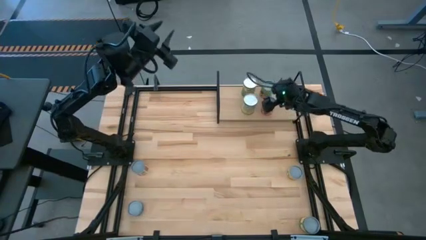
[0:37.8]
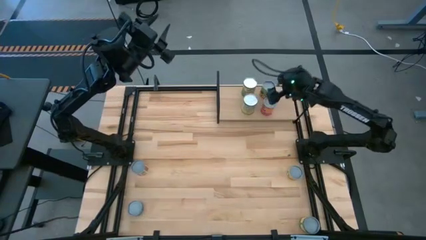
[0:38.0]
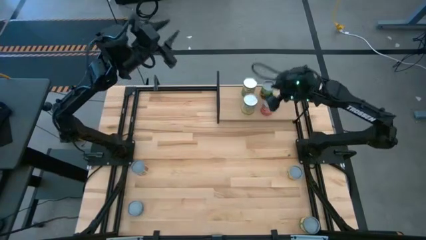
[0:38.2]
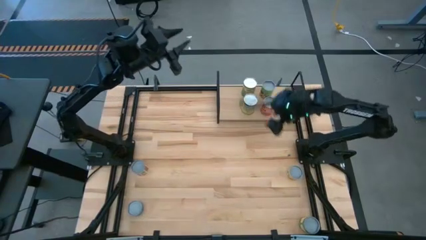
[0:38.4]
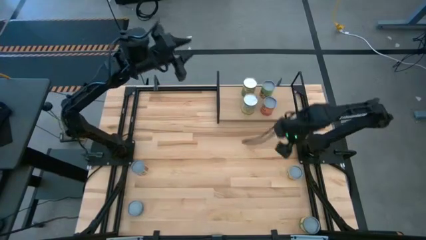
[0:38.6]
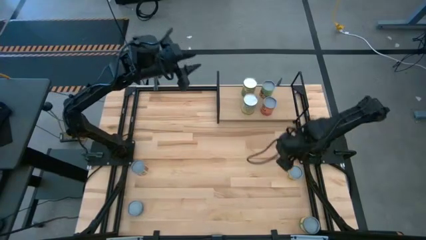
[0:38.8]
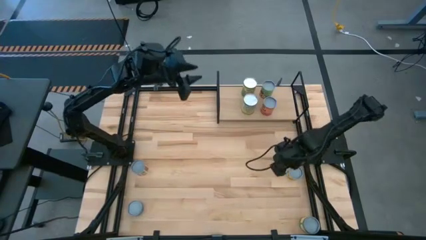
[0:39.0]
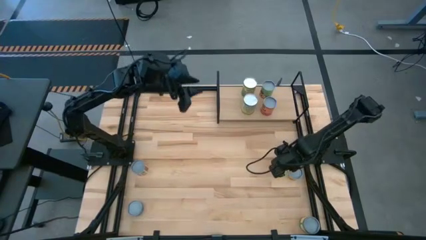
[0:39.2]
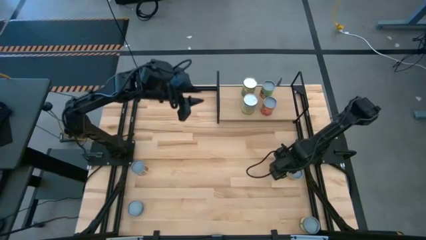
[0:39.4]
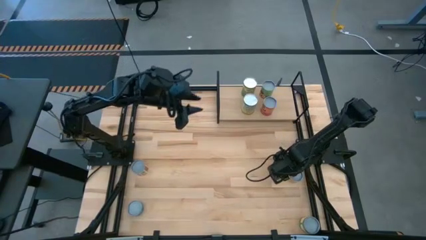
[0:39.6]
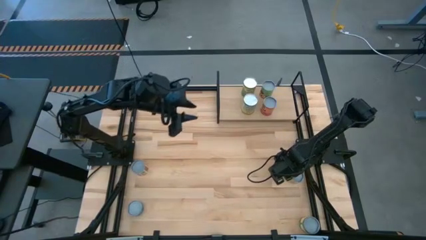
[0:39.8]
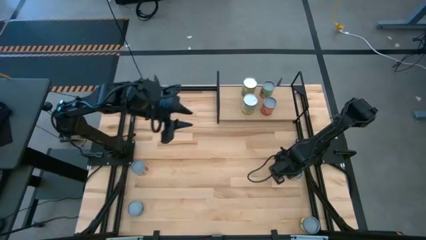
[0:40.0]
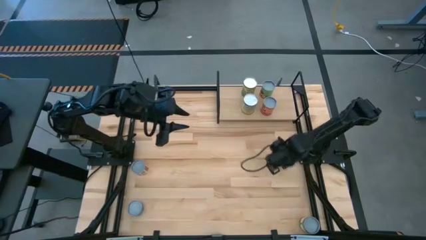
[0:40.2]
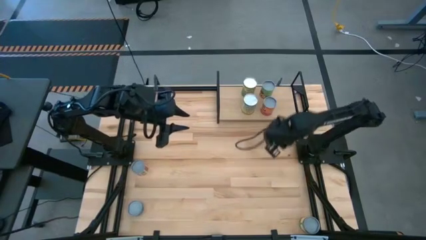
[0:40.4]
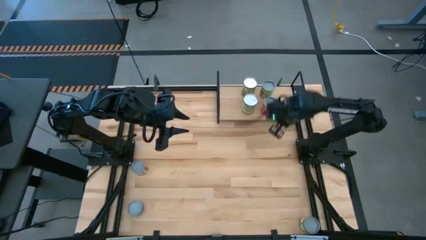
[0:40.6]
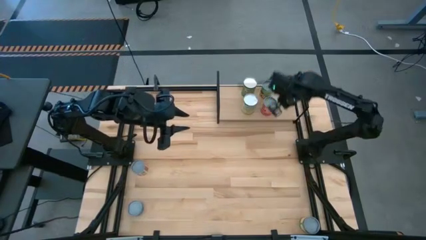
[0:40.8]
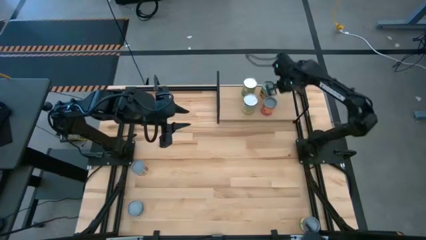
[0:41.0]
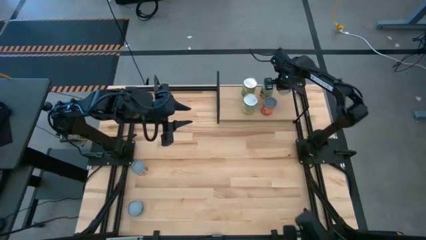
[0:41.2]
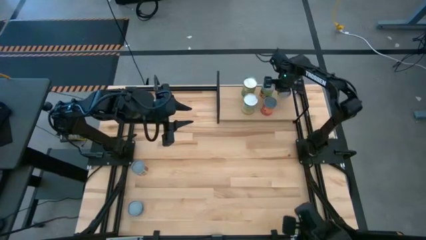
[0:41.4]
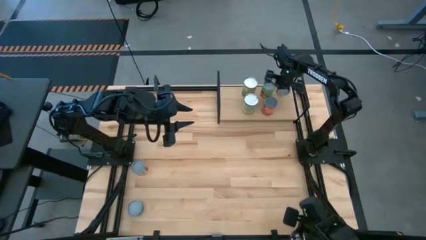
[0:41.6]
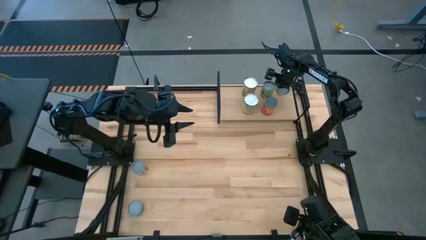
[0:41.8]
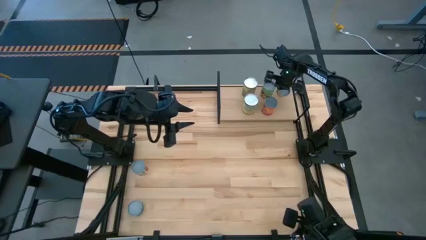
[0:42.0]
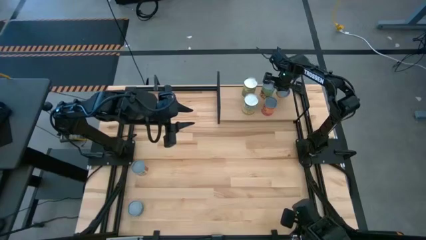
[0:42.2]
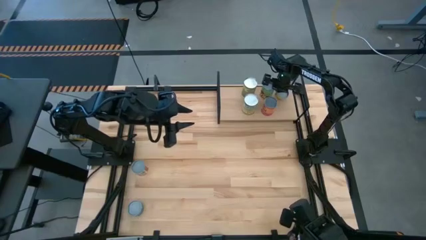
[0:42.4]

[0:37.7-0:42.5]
Task: Pick and place cans onto a shelf
Put the small yellow/green can on the shelf

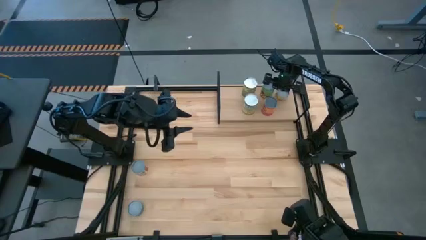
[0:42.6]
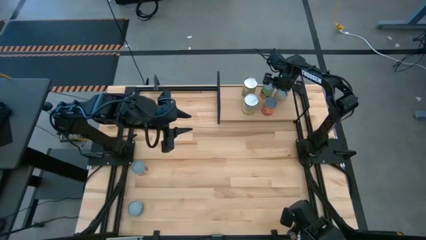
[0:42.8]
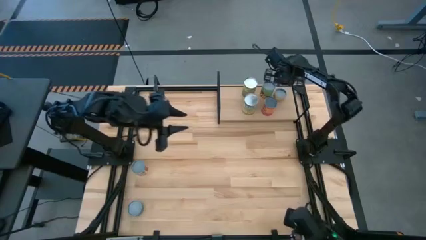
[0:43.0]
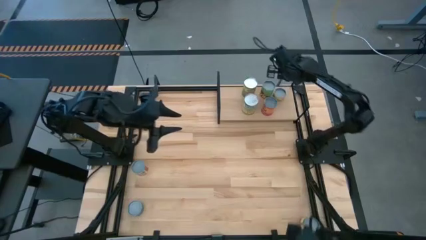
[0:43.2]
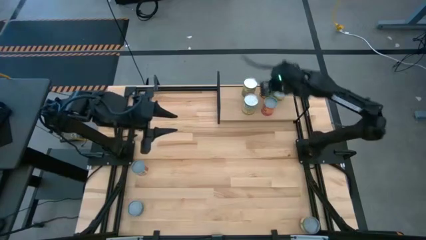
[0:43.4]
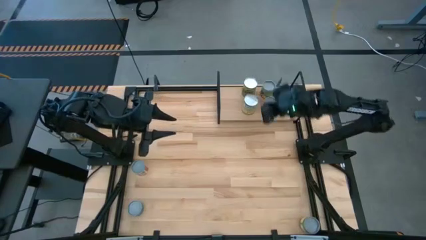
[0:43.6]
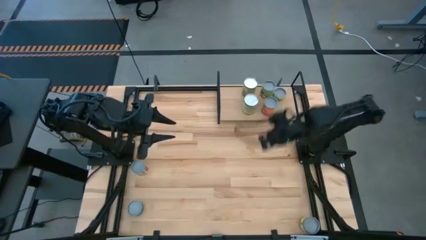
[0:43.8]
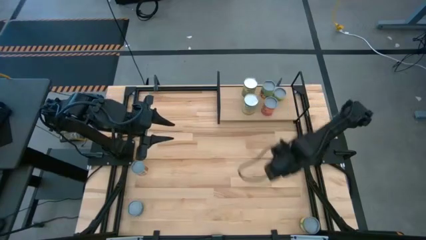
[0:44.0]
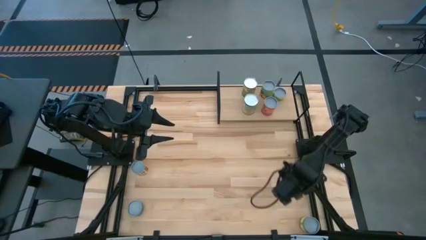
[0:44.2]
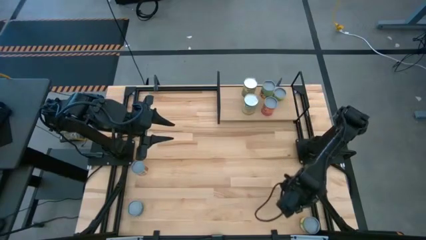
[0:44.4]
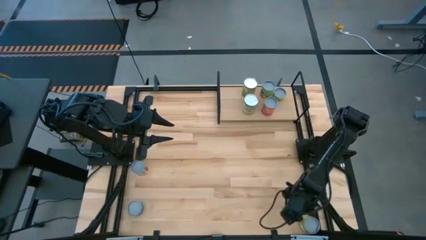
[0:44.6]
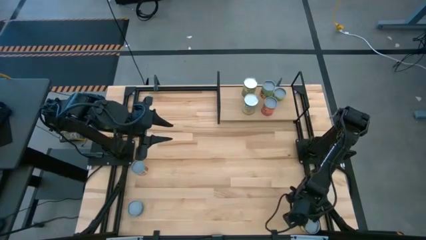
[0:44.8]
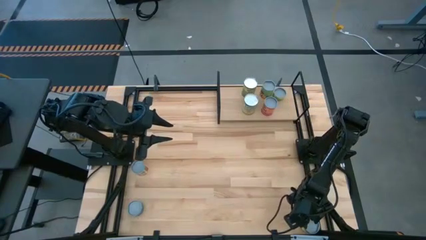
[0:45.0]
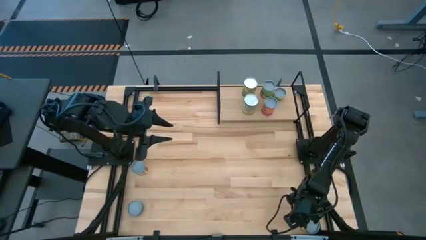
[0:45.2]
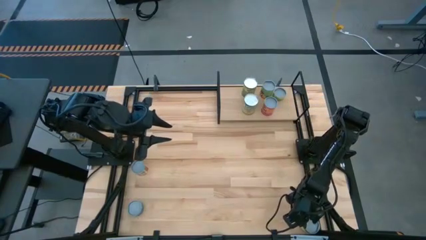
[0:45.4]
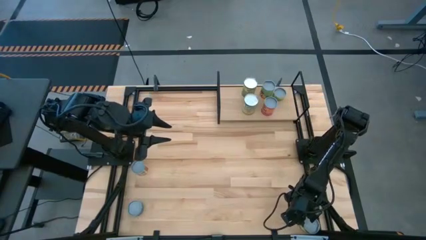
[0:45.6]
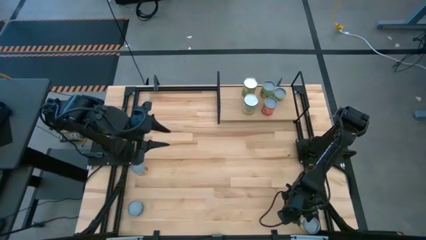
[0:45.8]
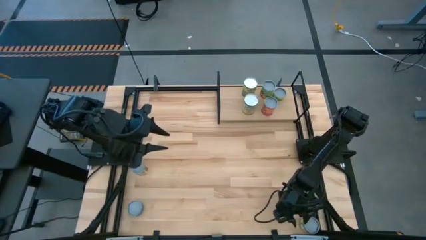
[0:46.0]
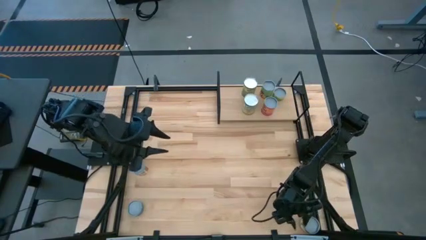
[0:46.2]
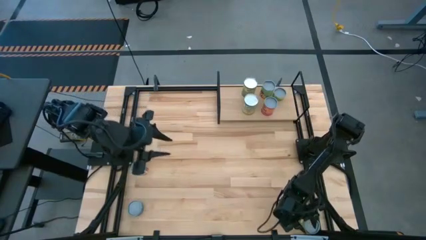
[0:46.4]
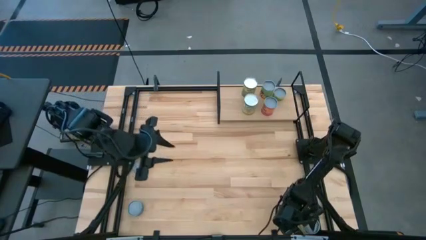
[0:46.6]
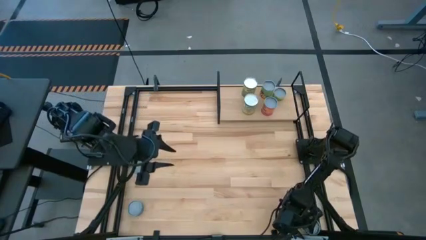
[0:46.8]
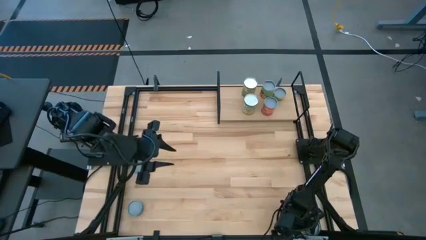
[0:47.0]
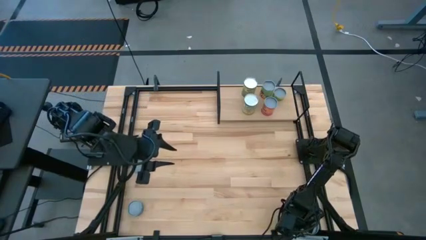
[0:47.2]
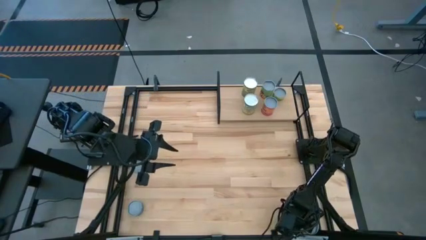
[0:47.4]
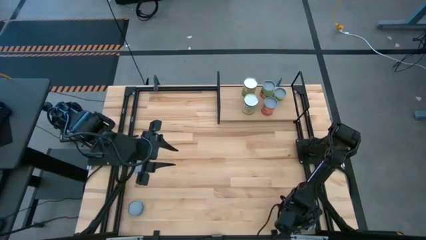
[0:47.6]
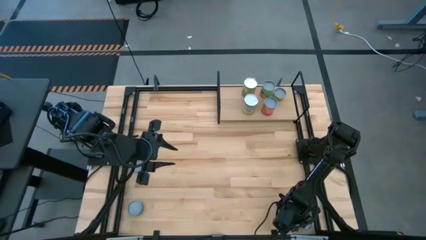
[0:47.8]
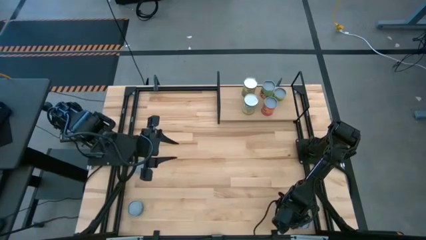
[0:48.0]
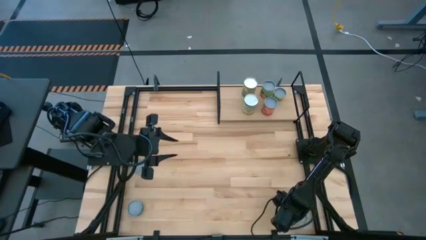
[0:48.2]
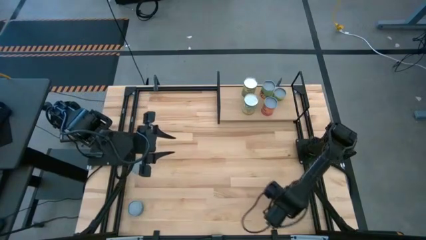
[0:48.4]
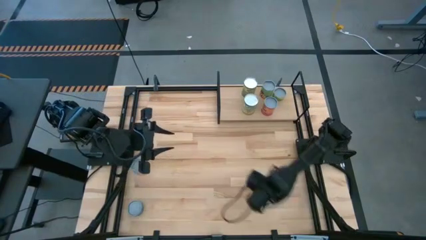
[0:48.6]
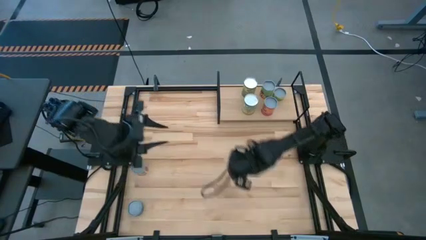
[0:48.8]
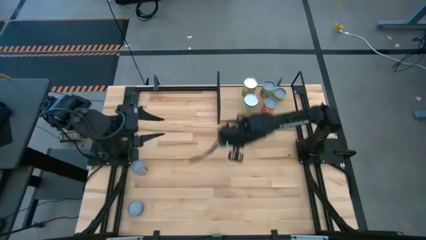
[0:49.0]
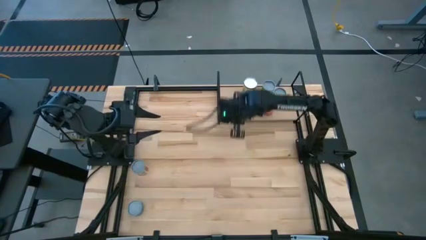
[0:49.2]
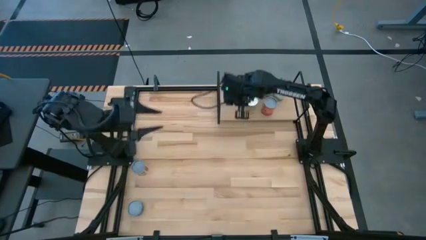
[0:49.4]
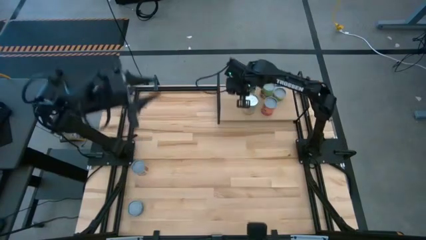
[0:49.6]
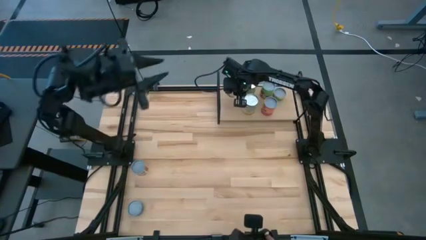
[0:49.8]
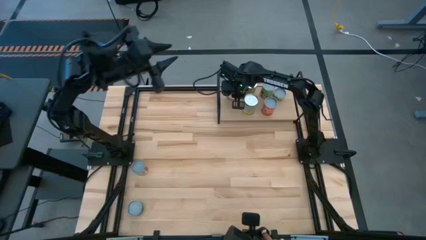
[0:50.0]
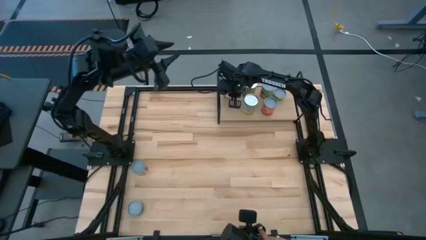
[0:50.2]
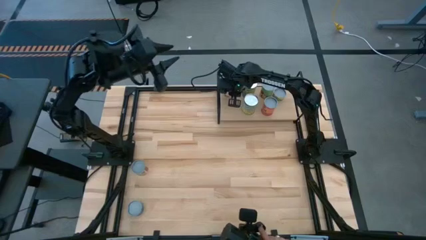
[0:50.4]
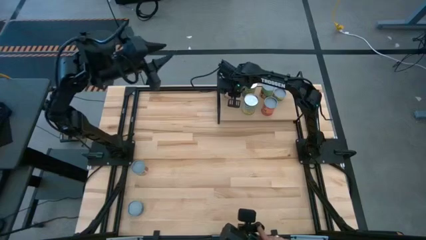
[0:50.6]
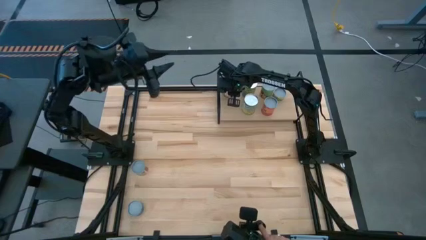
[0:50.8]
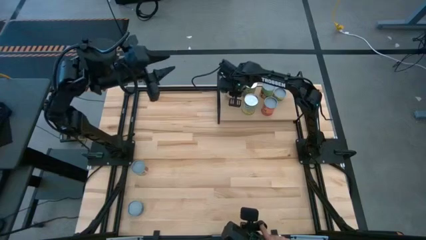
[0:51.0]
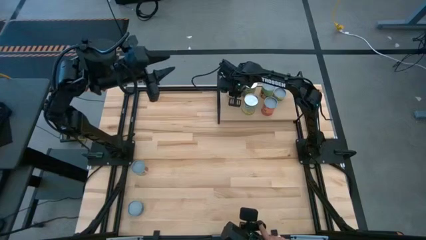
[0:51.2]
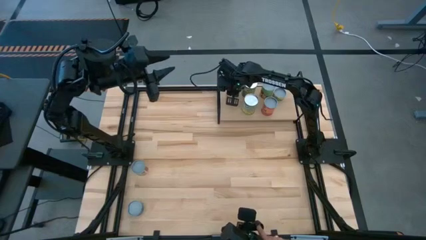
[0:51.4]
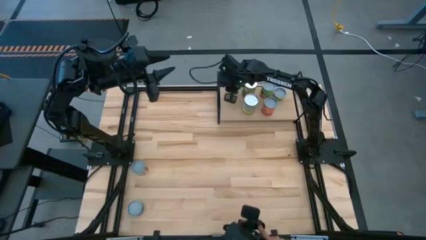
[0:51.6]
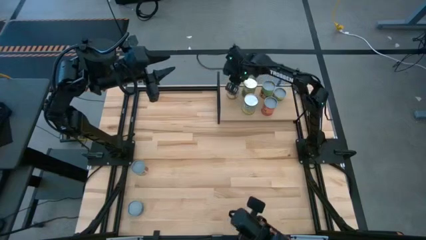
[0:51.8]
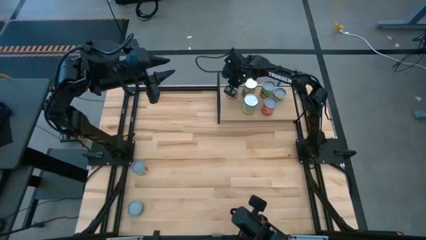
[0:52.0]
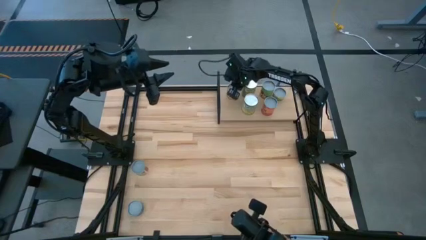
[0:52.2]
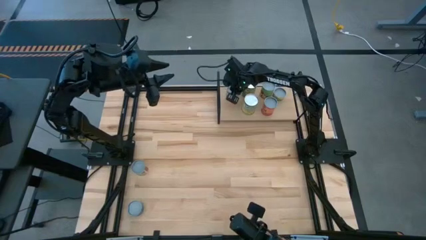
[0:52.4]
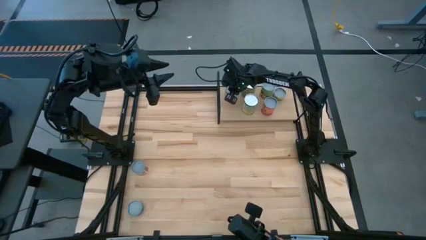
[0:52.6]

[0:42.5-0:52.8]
Put the green/orange can on the shelf

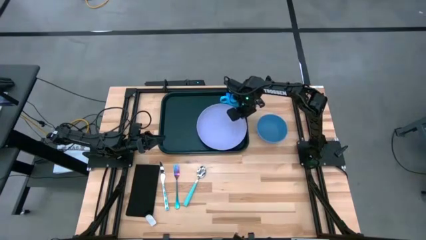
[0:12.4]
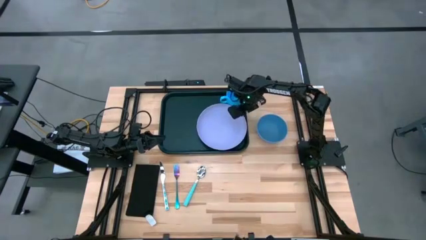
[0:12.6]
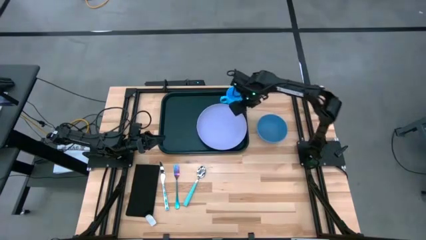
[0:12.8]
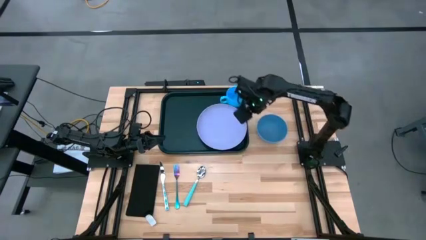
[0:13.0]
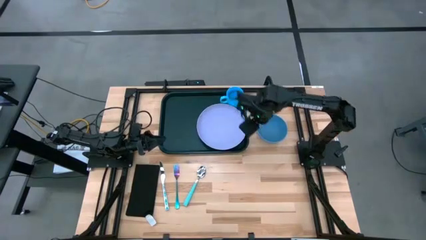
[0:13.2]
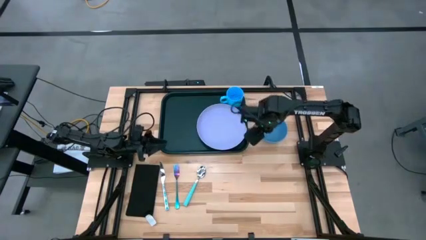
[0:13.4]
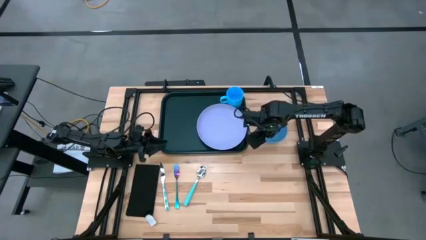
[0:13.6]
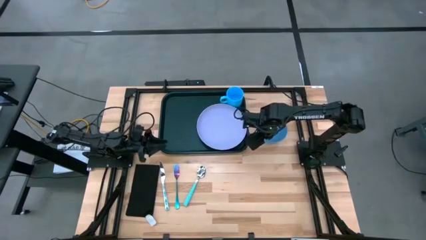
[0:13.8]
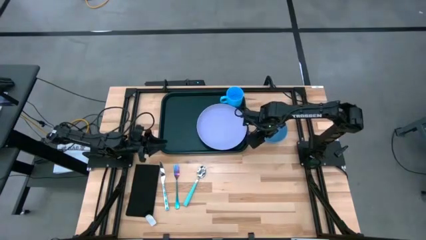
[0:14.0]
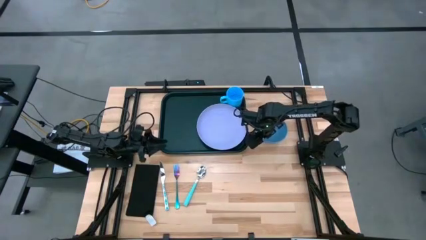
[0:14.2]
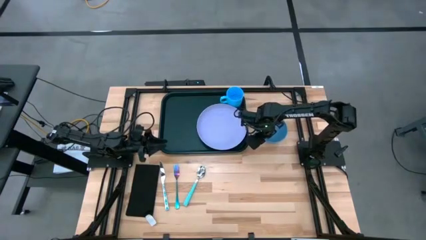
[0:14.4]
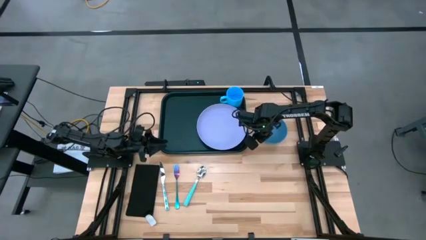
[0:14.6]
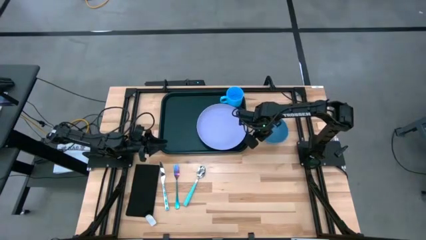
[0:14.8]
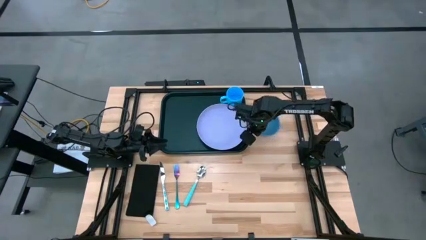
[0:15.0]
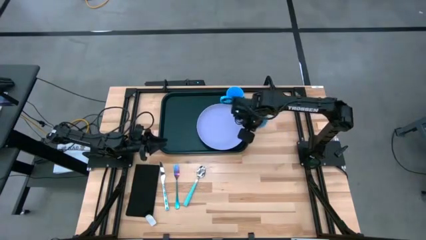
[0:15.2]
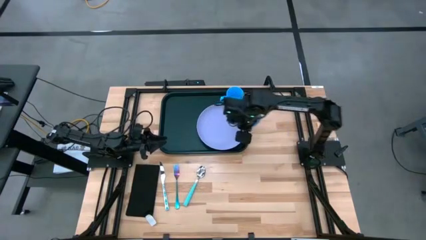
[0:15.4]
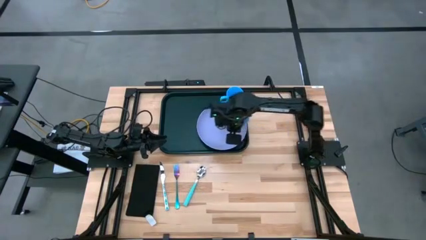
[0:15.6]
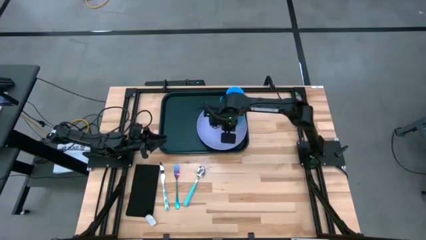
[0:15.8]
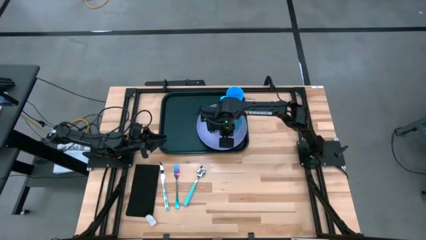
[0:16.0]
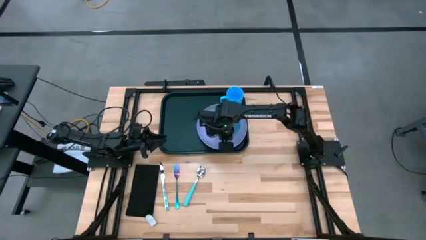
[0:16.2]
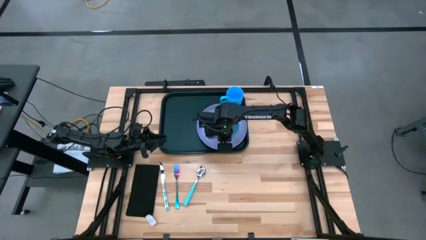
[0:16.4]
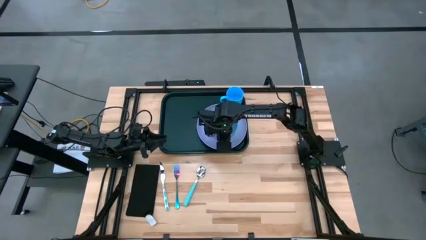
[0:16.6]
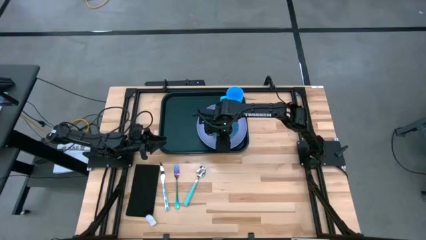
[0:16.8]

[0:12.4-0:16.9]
Task: Set up tray
Put the blue bowl on top of the purple plate on the black tray
